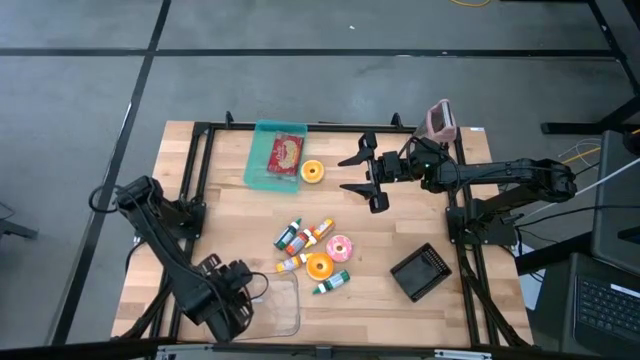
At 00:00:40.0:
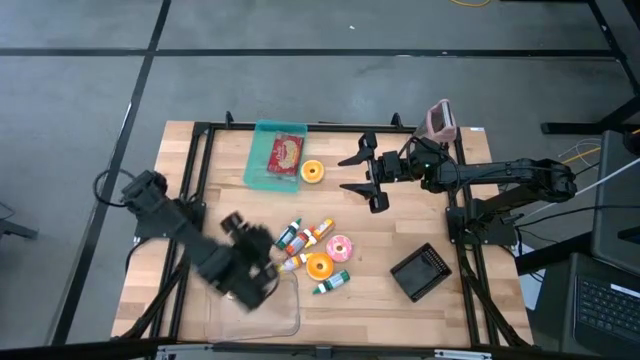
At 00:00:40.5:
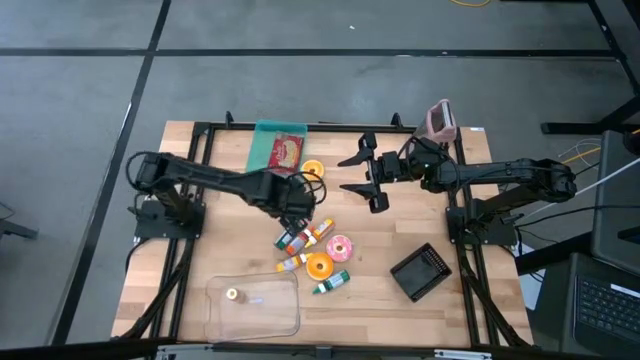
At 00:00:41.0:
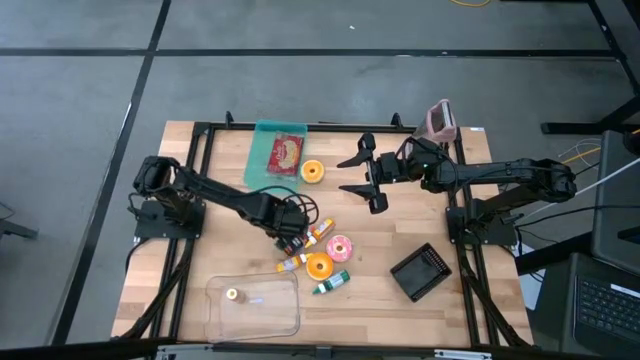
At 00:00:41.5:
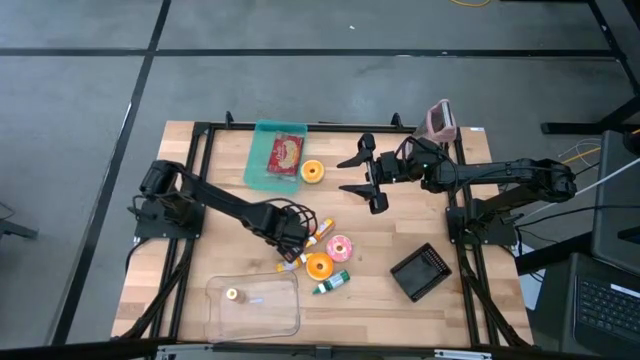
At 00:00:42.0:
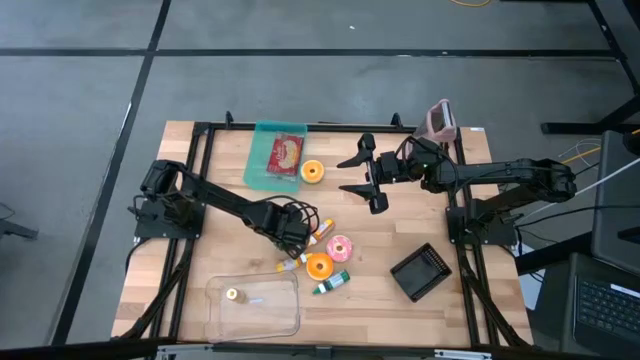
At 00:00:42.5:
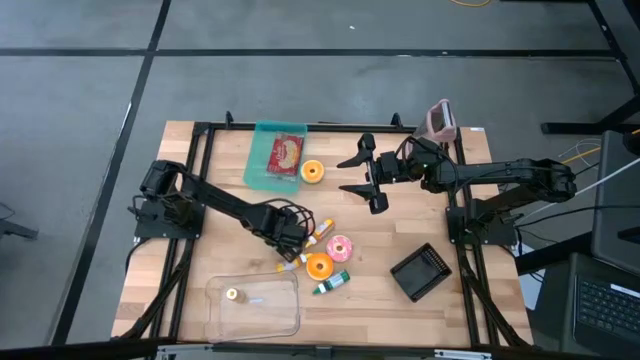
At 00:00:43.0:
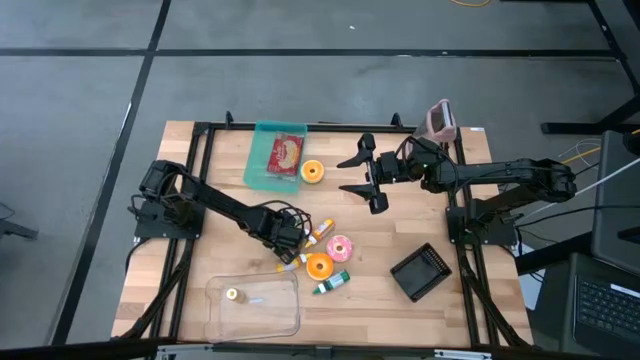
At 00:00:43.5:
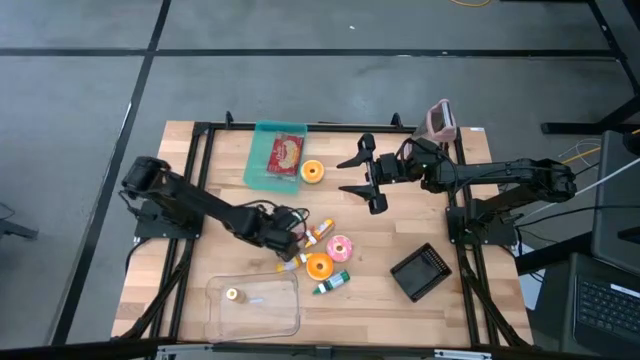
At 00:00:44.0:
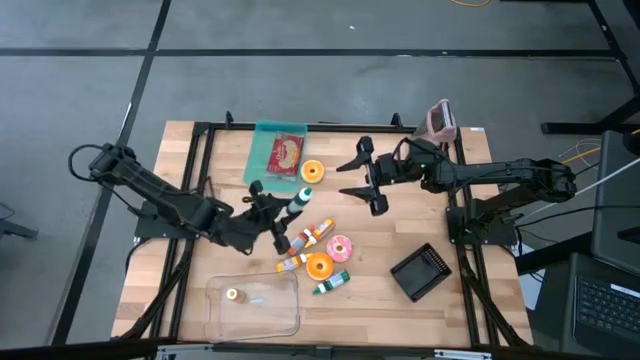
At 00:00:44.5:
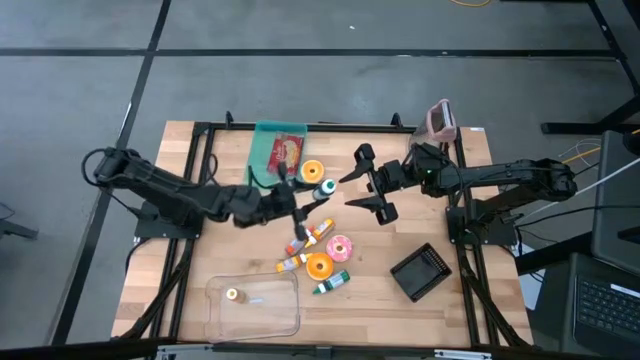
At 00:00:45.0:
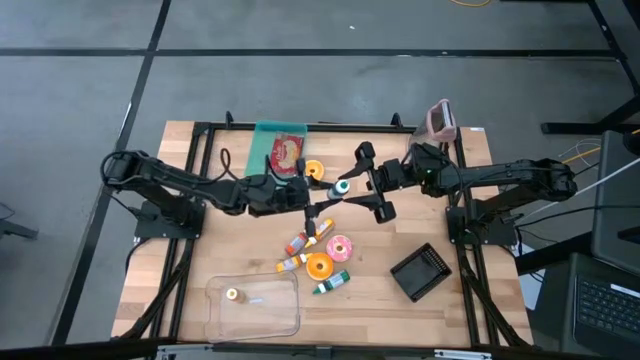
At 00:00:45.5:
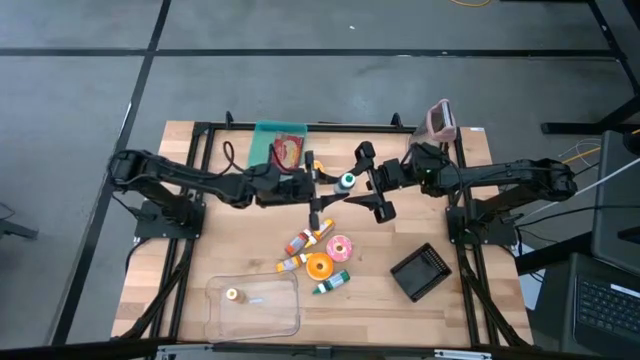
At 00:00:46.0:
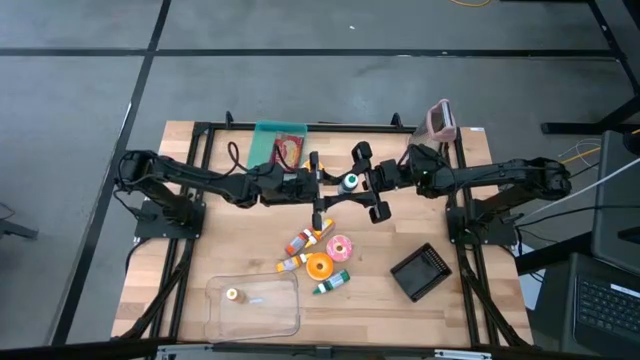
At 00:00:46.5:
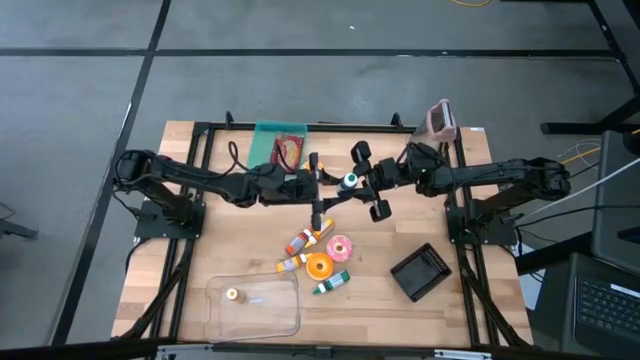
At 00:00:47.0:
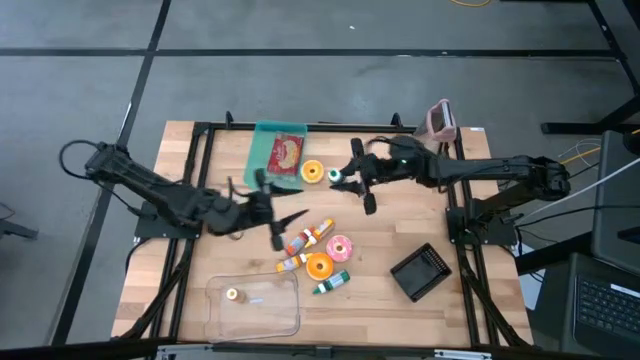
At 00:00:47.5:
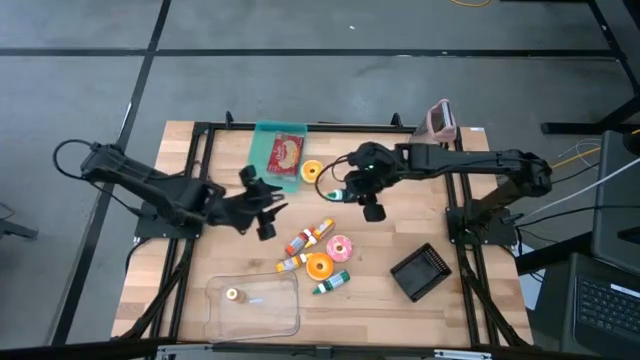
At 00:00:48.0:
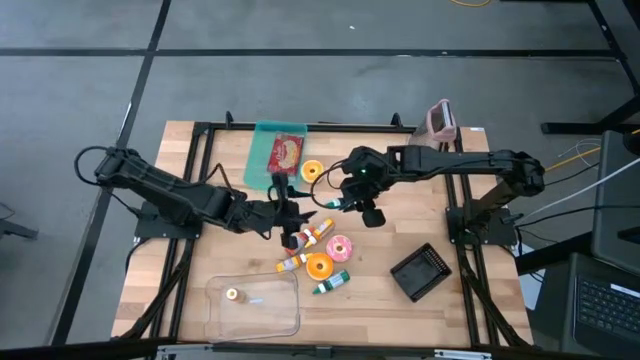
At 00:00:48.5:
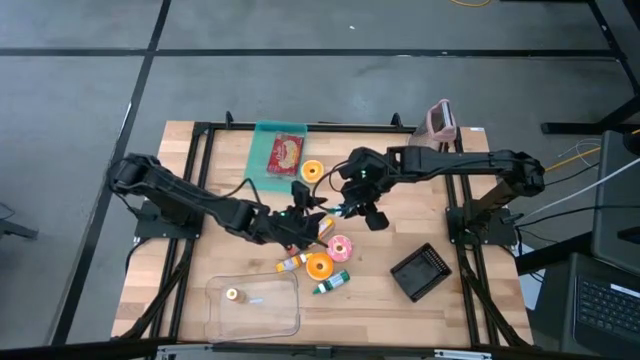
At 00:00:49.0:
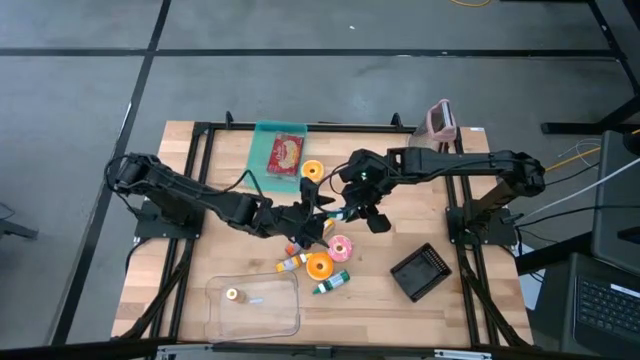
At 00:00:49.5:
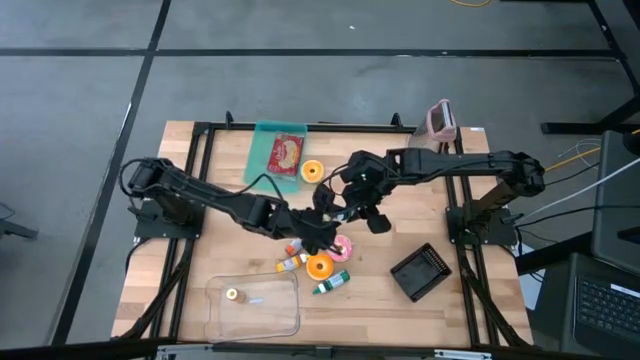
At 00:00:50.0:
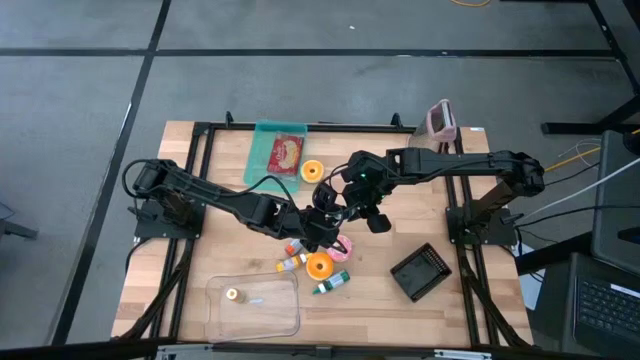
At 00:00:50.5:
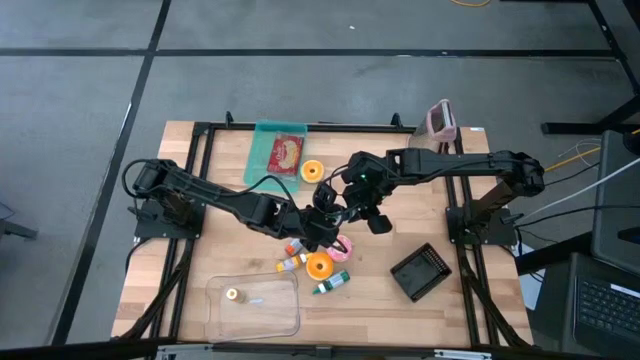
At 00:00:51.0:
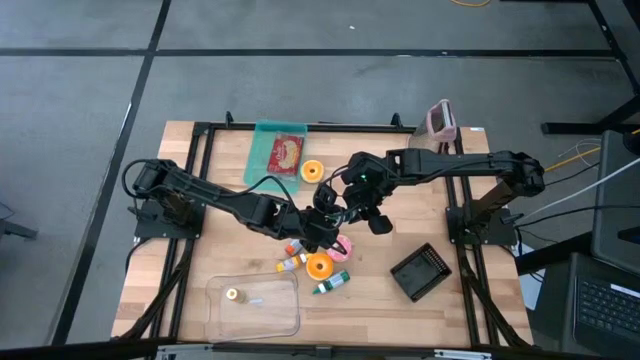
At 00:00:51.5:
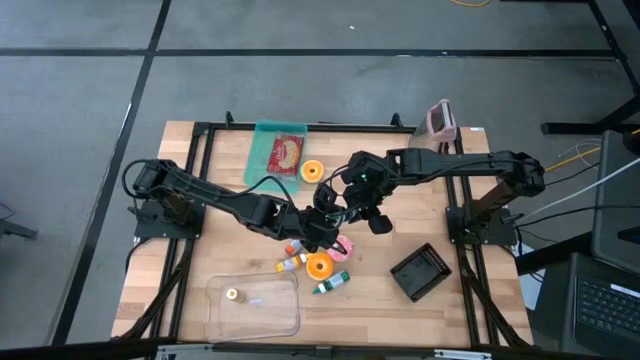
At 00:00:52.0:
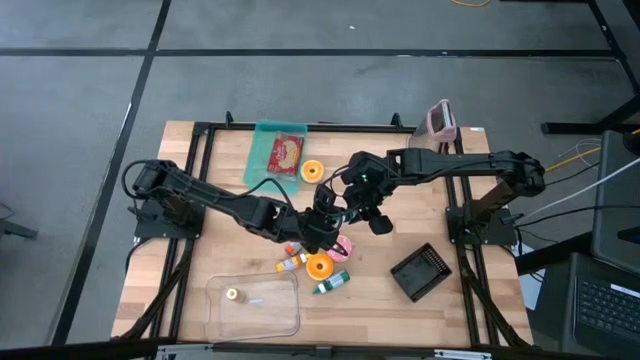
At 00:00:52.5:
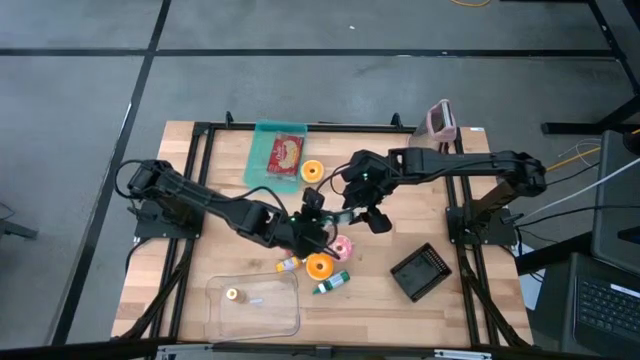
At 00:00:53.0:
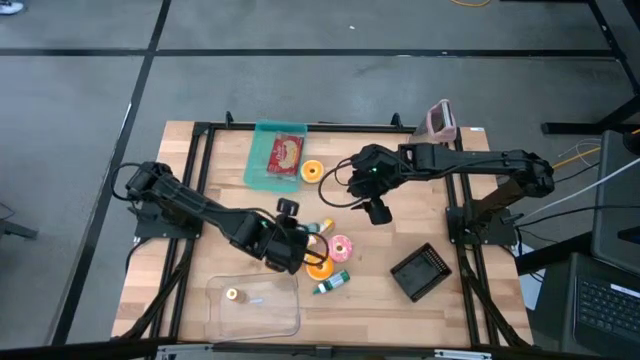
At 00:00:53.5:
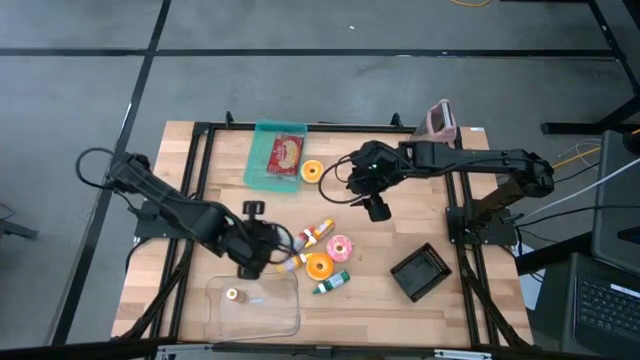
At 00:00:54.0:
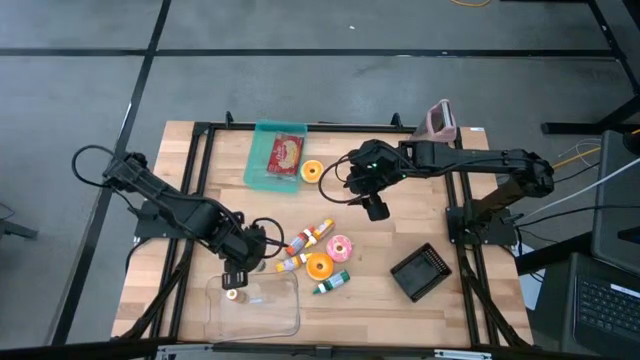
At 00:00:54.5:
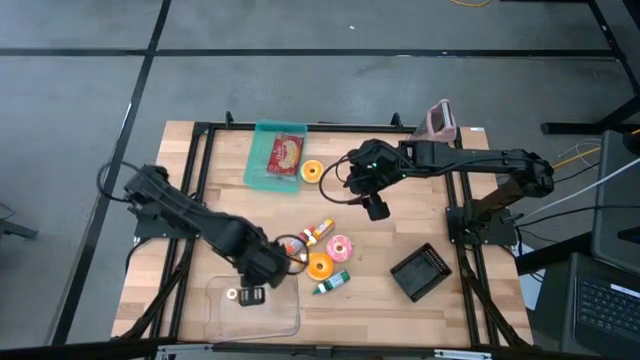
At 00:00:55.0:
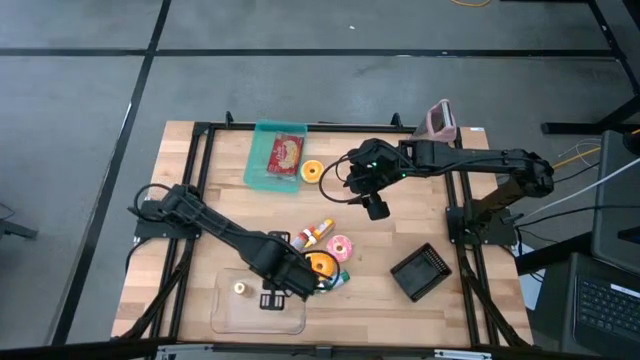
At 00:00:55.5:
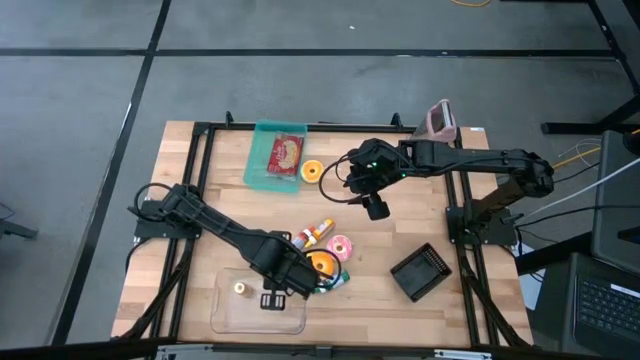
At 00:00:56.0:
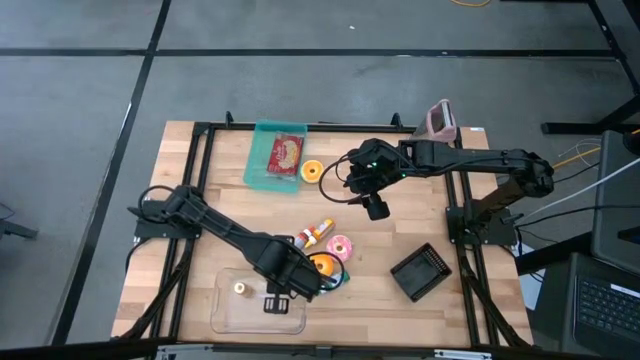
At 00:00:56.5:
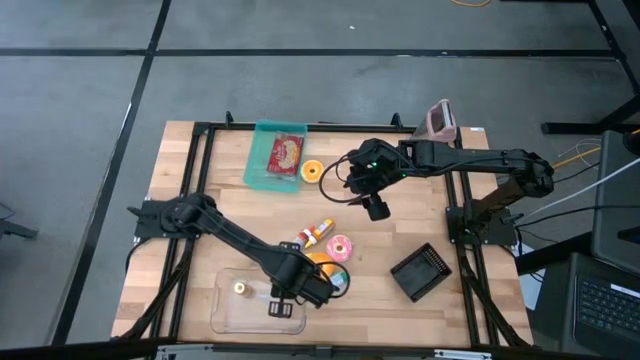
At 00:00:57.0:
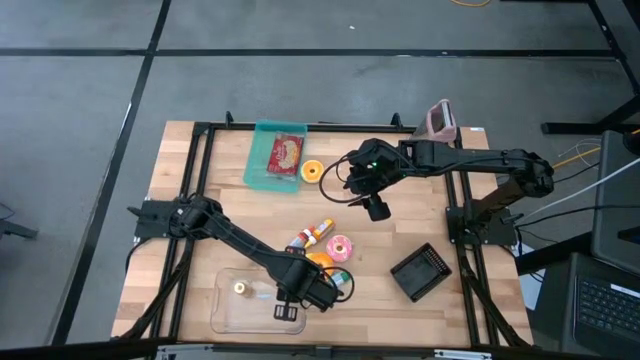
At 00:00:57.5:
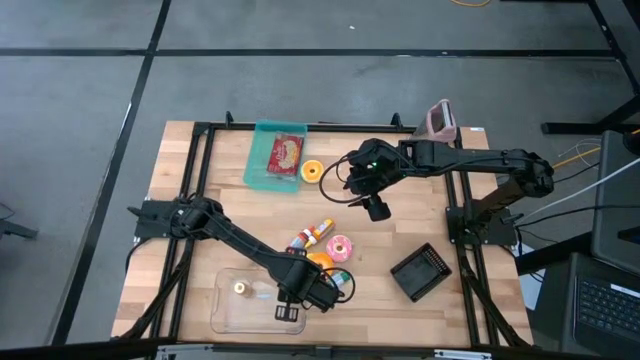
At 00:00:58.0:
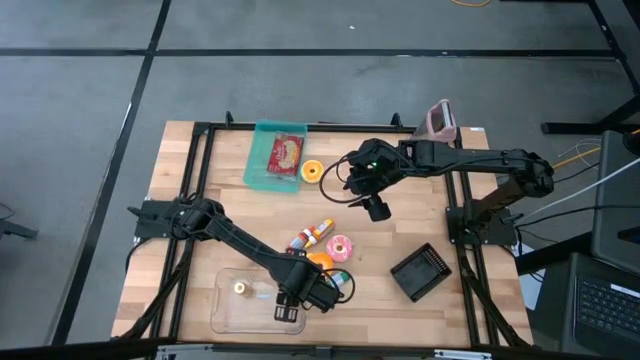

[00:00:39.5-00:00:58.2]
Put the top green food coloring bottle into the transparent bin

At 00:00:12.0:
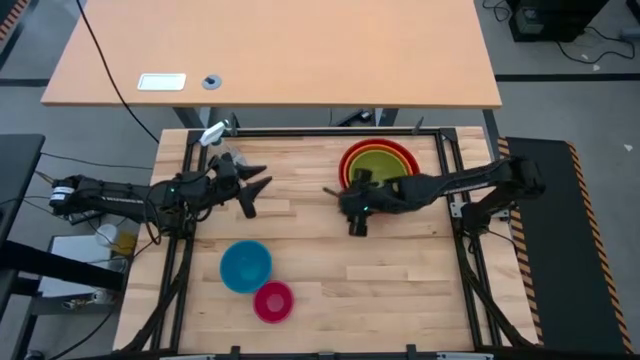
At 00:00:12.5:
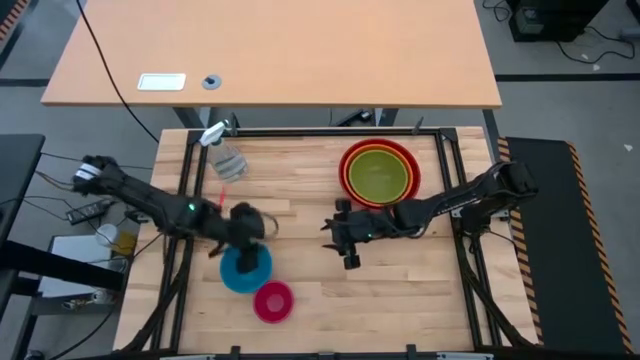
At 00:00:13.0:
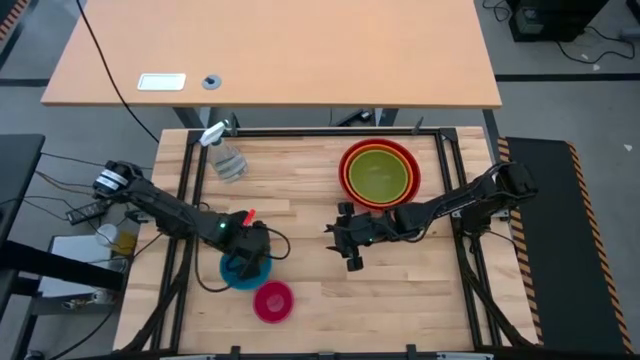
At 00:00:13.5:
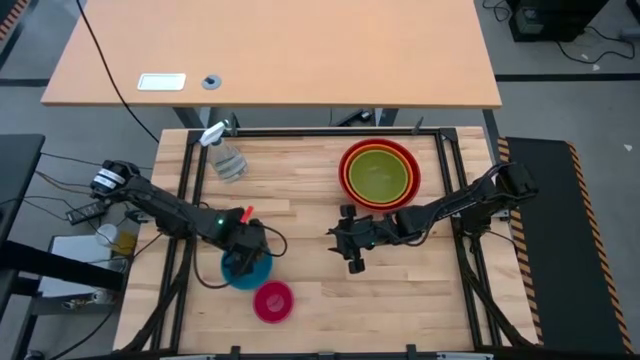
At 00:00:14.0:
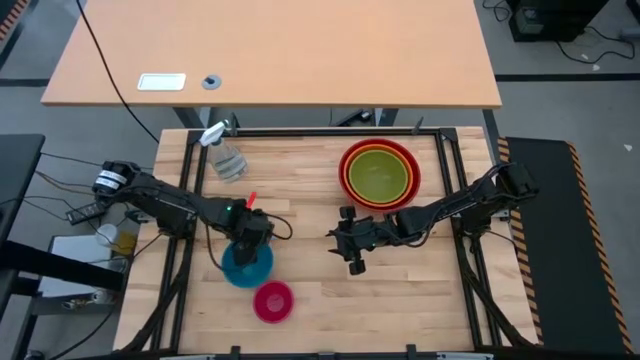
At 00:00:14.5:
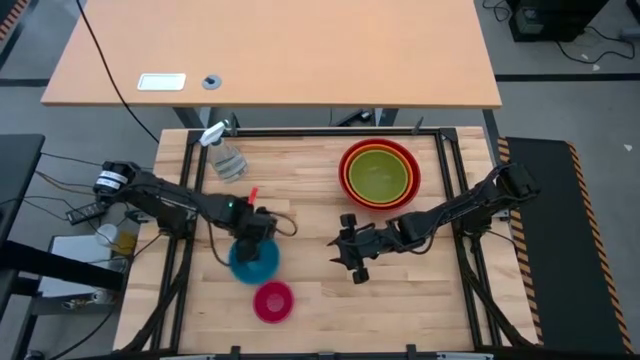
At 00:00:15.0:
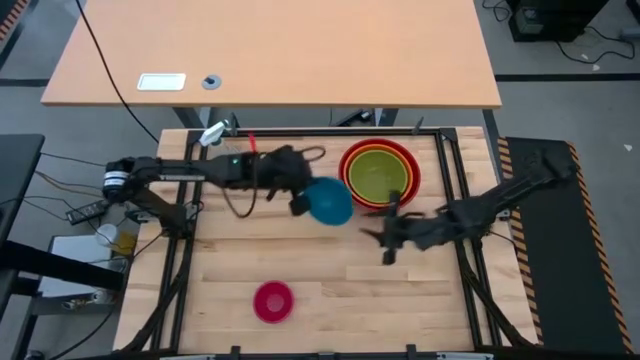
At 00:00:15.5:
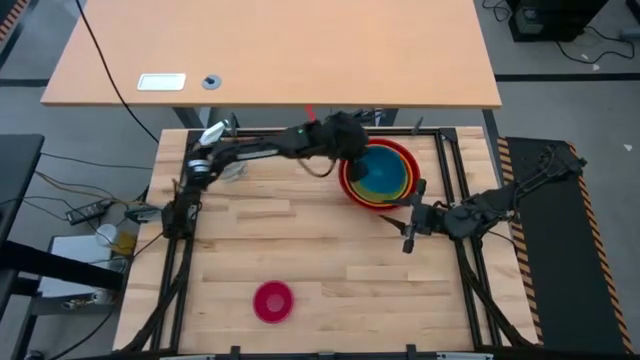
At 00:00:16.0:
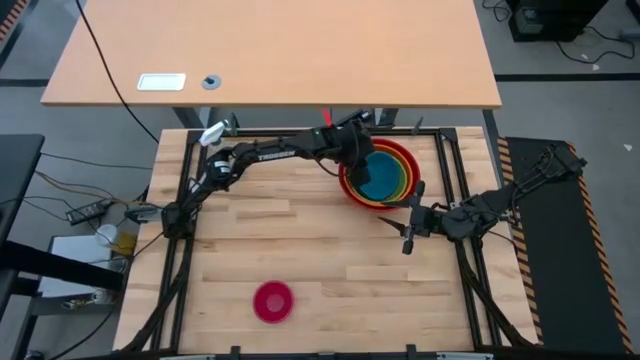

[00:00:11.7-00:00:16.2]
Stack the blue bowl on top of the green bowl
